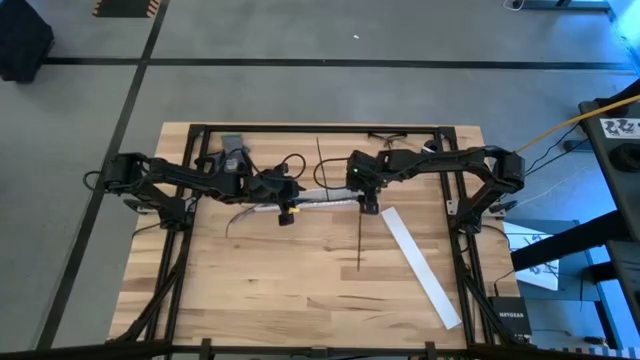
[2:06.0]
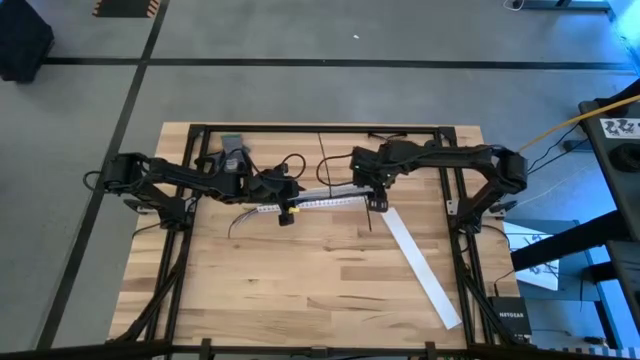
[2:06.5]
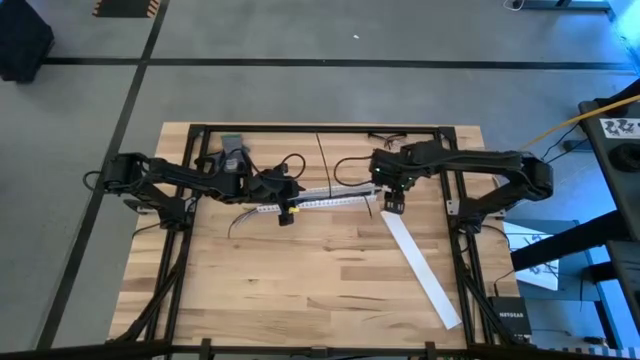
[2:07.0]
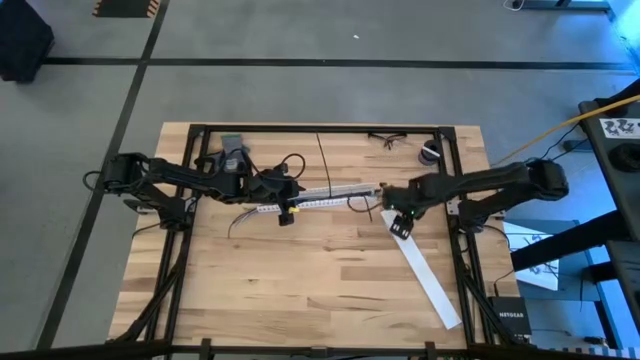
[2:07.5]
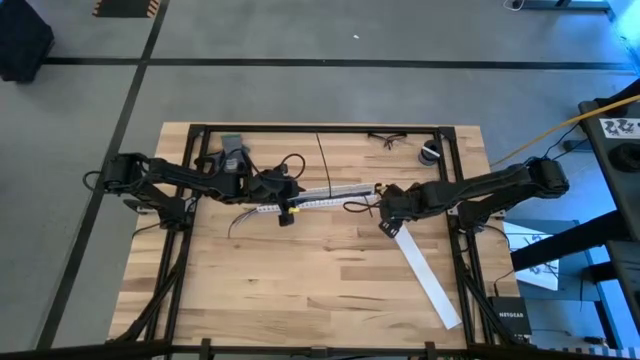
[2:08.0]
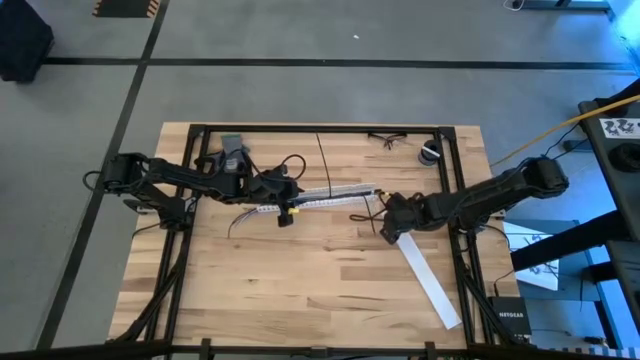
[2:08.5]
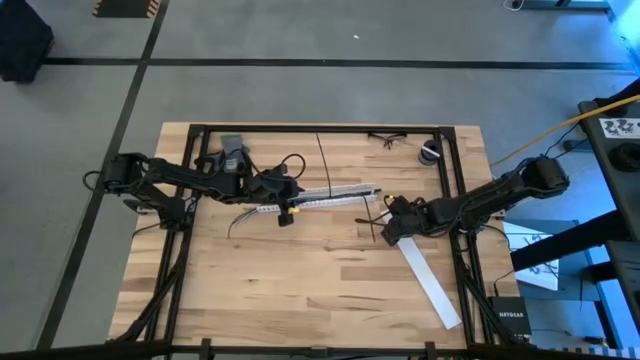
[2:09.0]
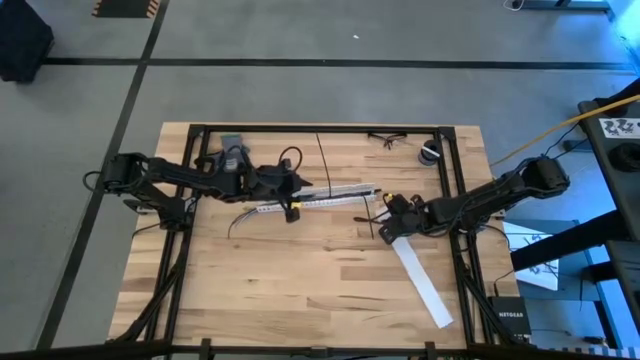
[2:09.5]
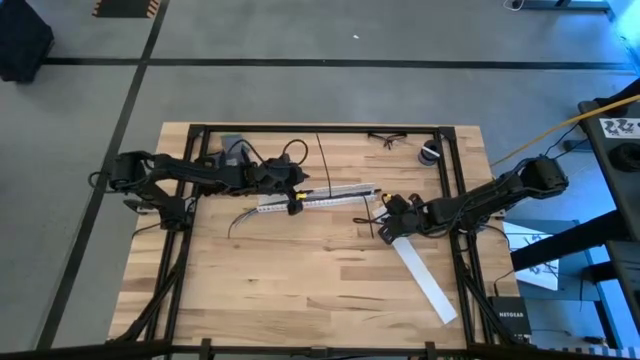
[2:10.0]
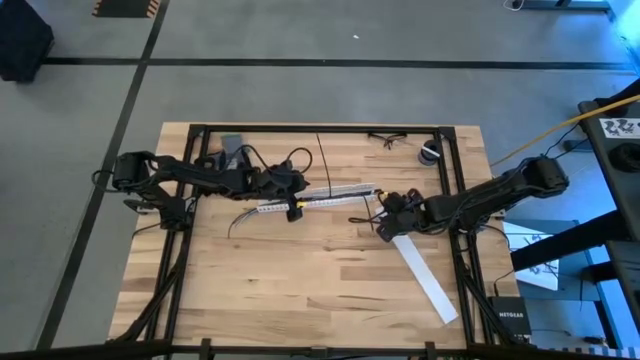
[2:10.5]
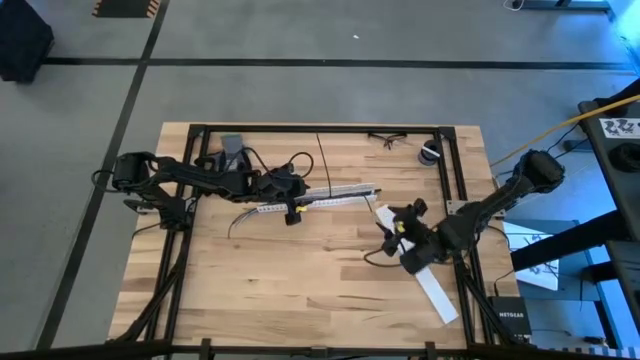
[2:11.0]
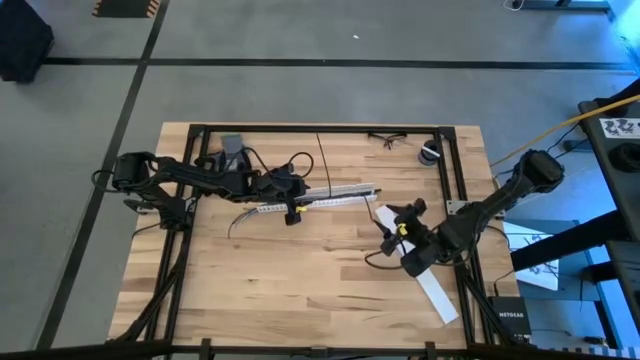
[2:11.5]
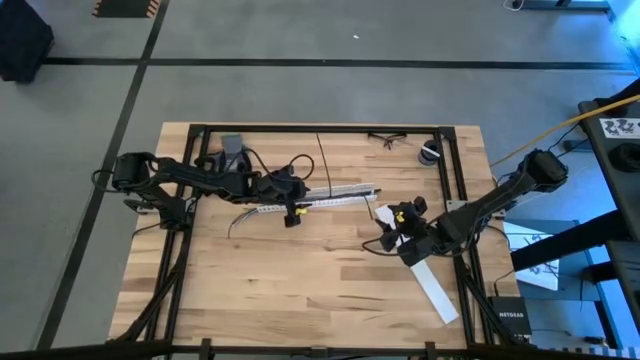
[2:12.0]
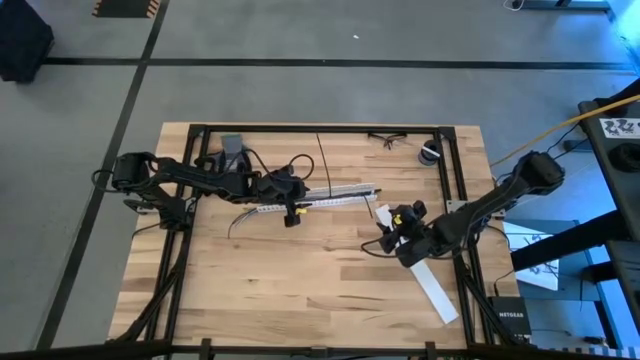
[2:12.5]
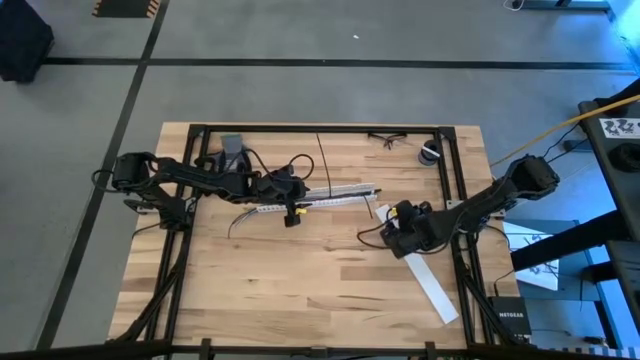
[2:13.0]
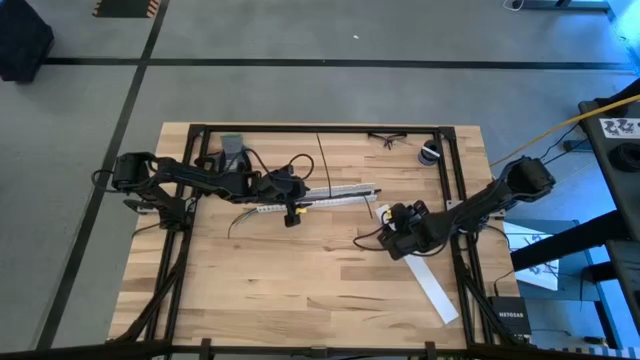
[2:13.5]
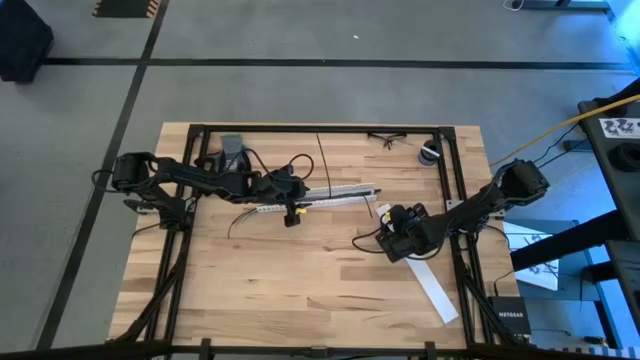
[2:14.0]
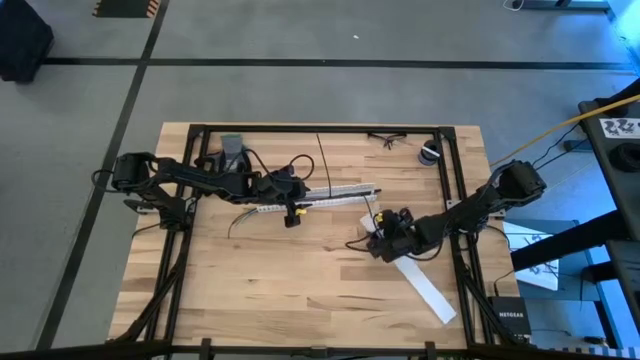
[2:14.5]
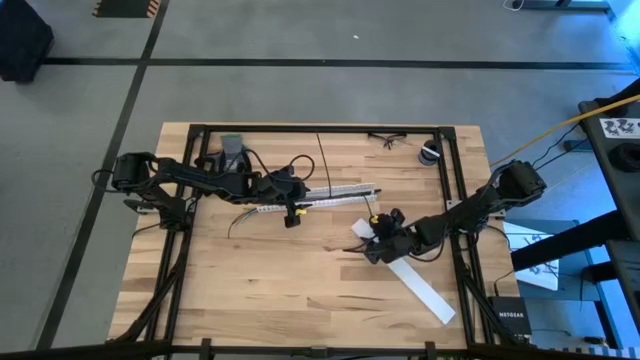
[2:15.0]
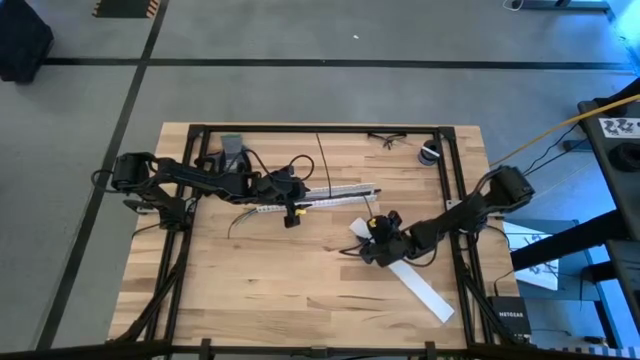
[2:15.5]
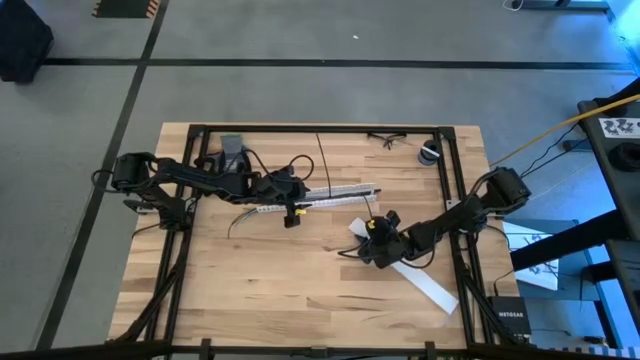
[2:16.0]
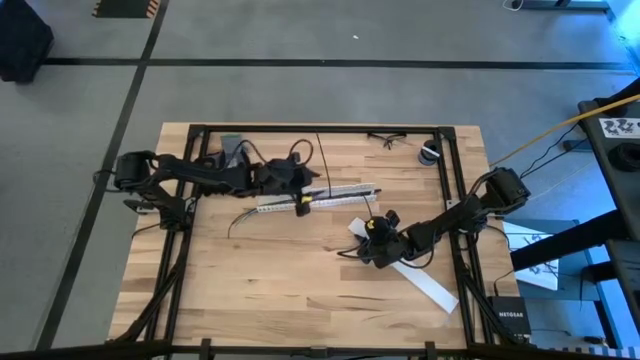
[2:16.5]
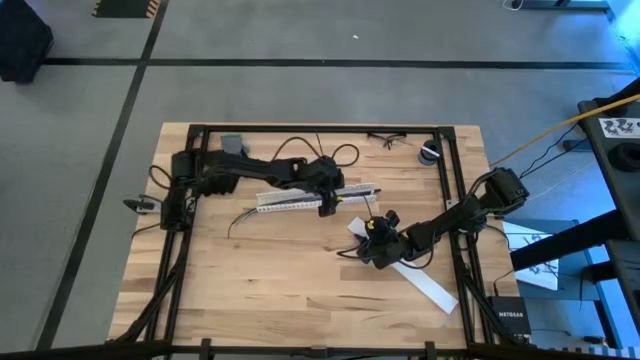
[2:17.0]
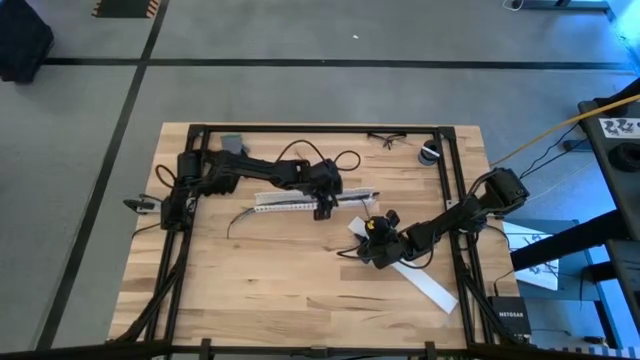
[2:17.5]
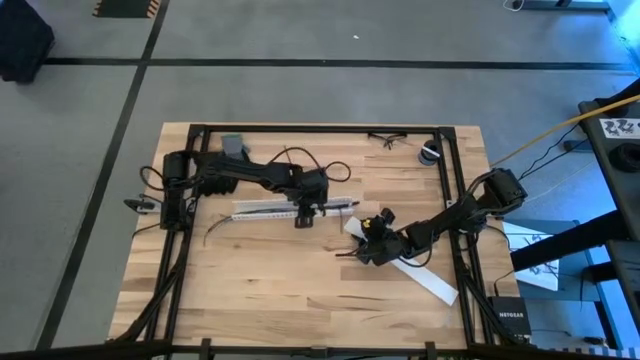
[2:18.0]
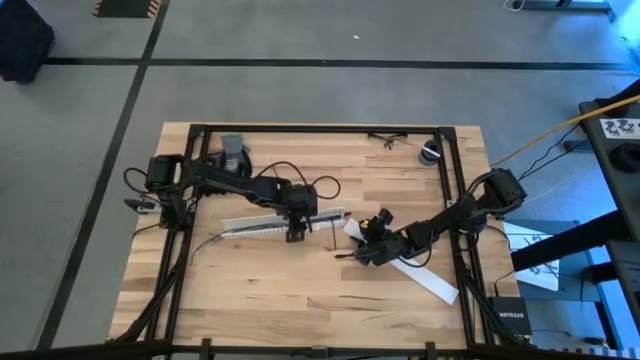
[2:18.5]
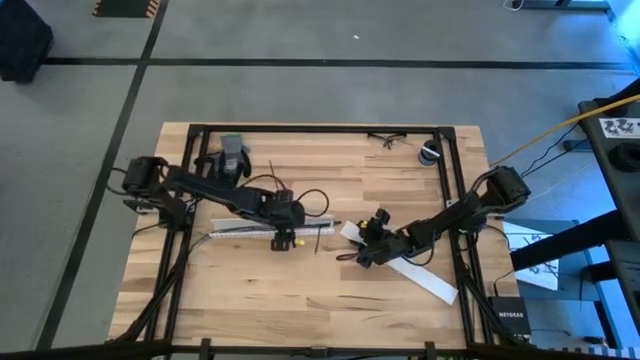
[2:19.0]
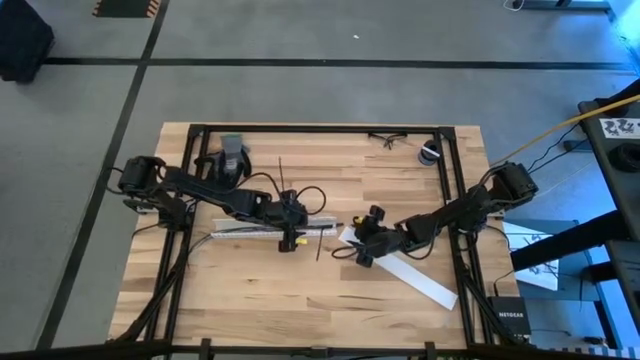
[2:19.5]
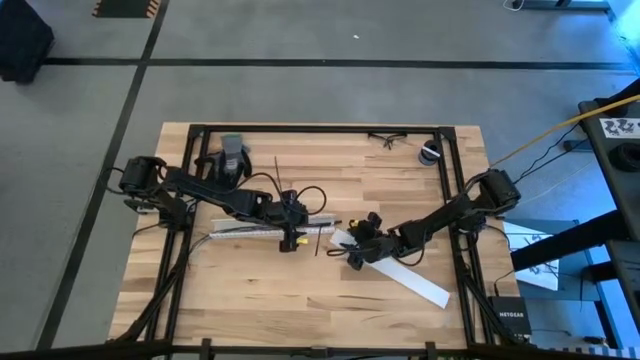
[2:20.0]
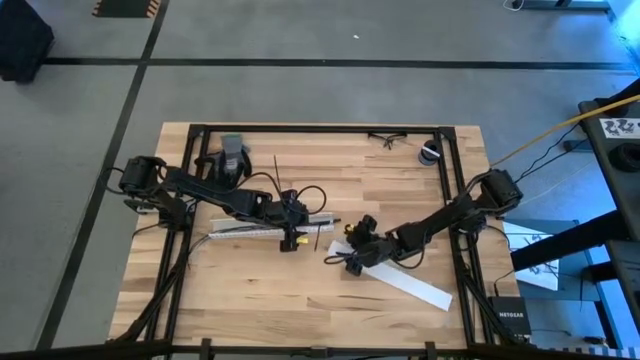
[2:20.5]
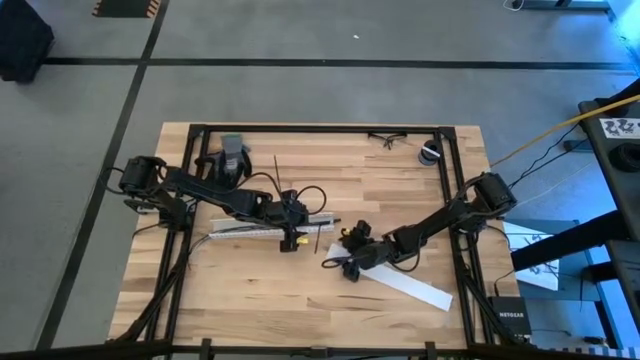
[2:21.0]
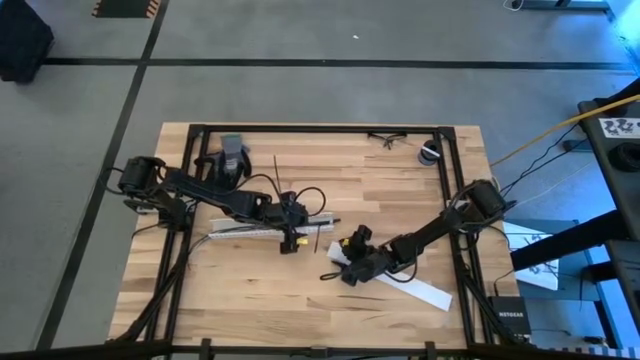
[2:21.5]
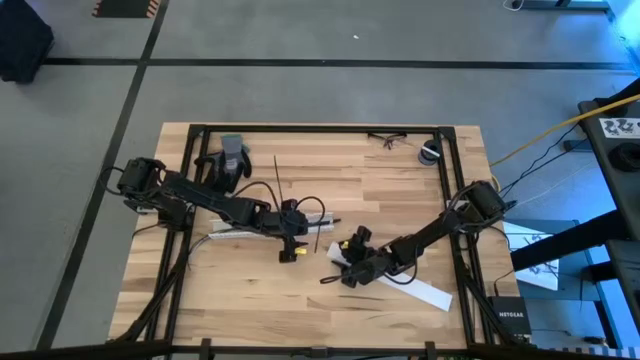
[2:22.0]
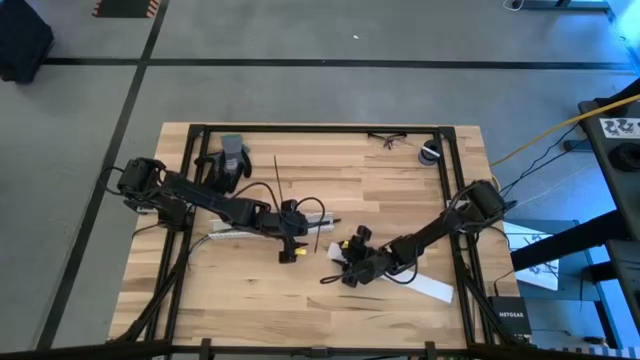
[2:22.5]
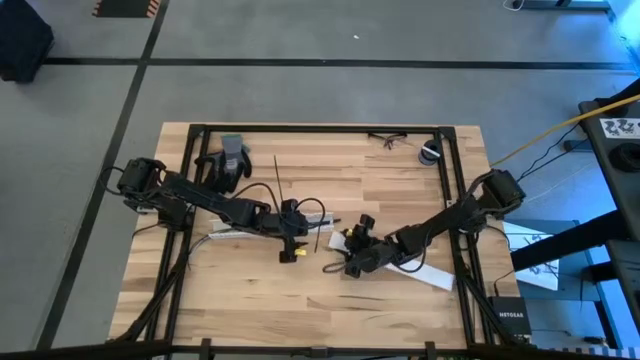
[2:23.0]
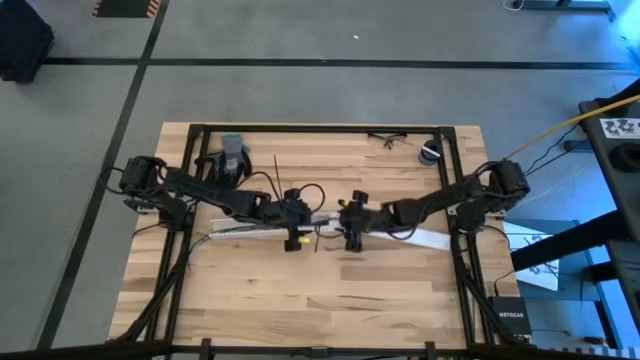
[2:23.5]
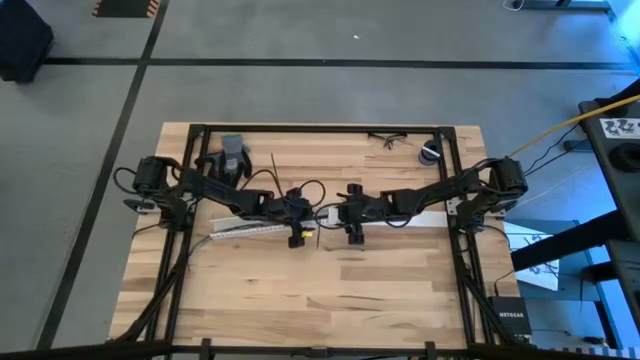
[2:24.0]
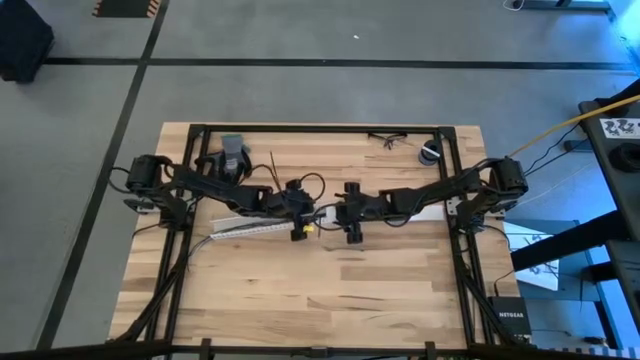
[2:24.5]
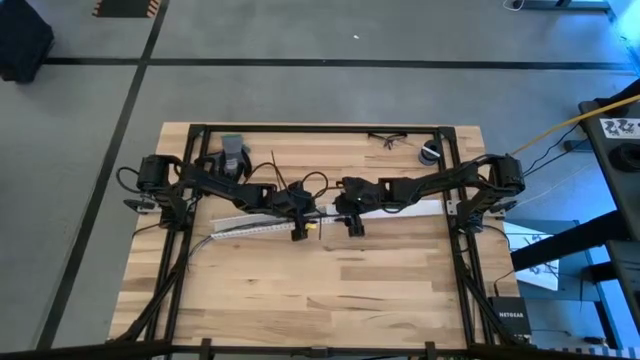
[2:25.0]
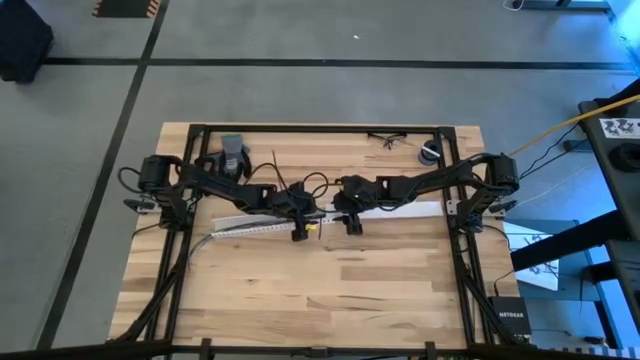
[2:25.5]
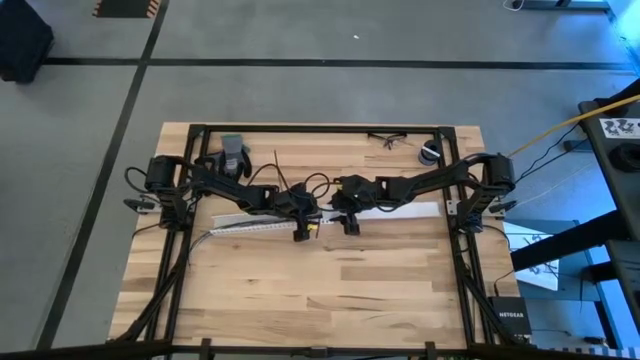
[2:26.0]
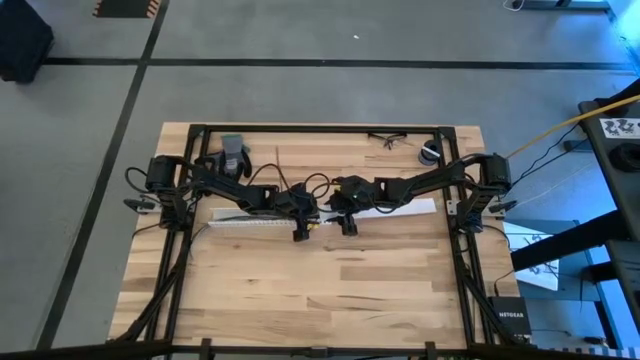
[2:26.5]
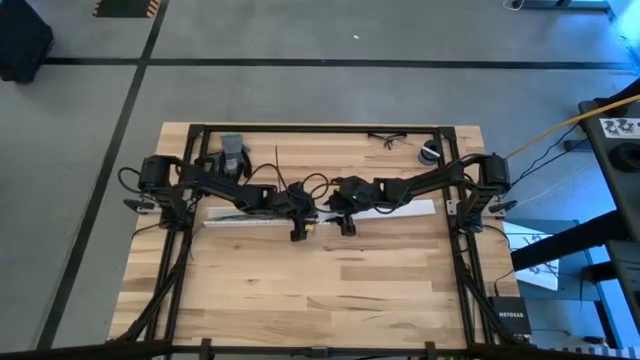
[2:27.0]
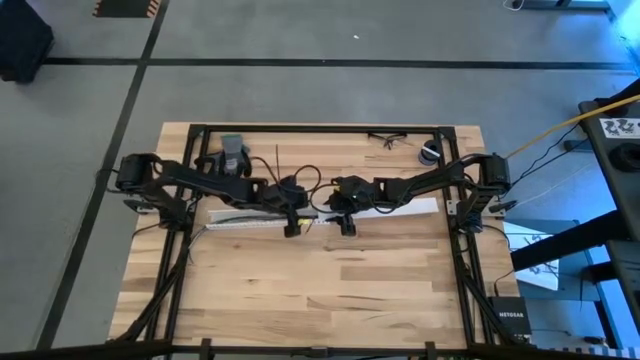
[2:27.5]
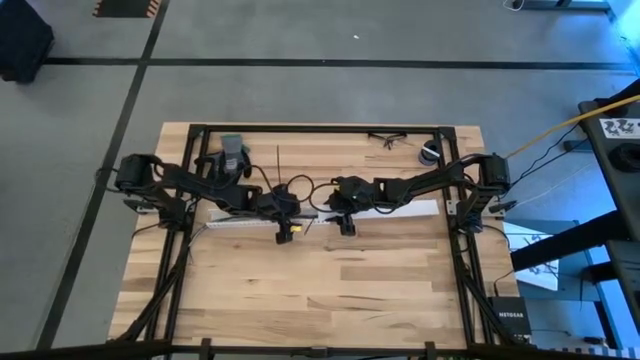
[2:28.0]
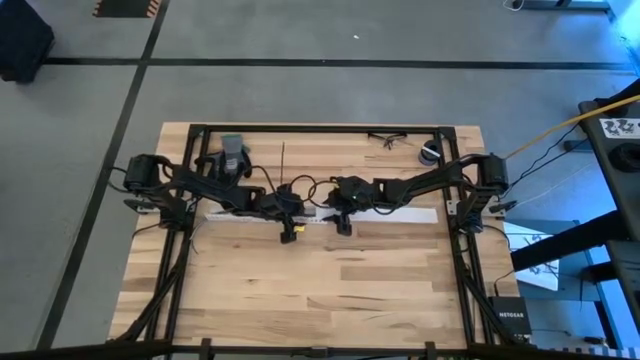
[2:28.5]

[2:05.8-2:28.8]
Task: Ziptie cables
Close the white cable duct with the lid
